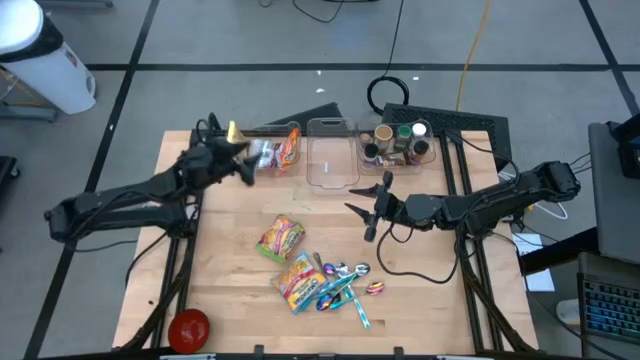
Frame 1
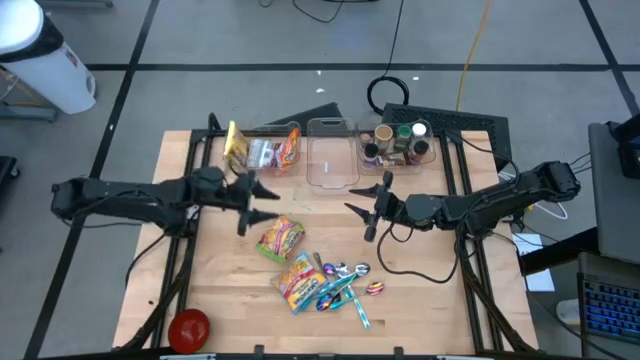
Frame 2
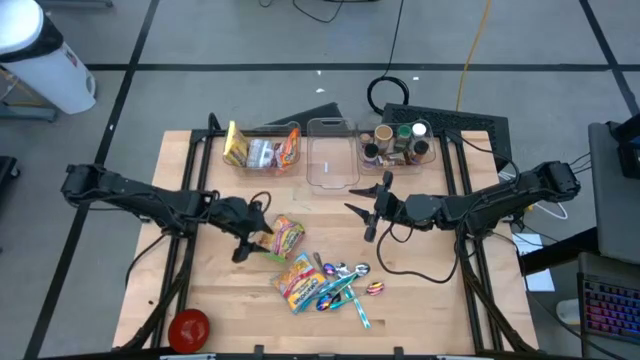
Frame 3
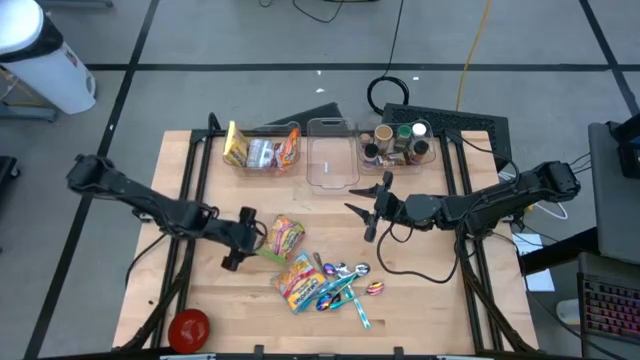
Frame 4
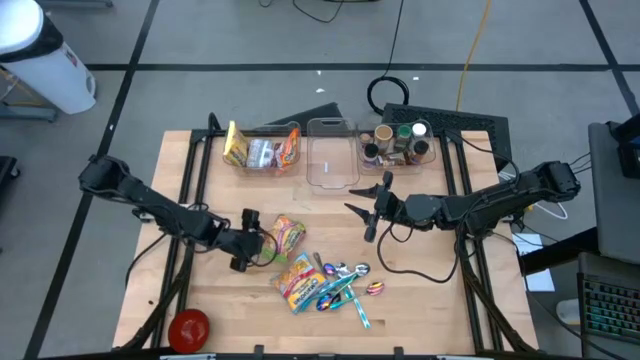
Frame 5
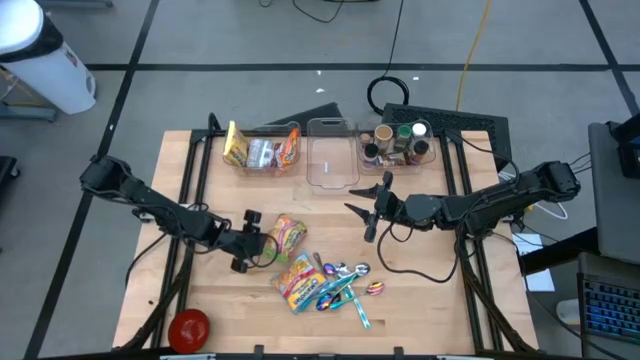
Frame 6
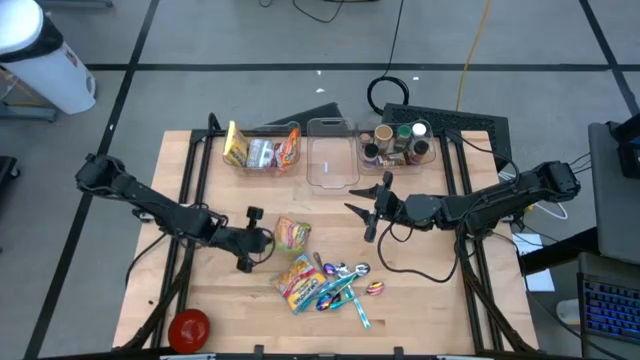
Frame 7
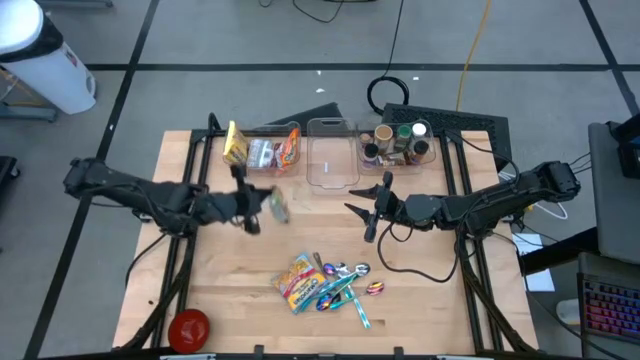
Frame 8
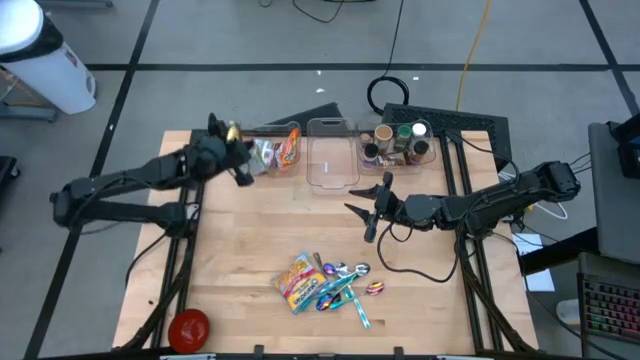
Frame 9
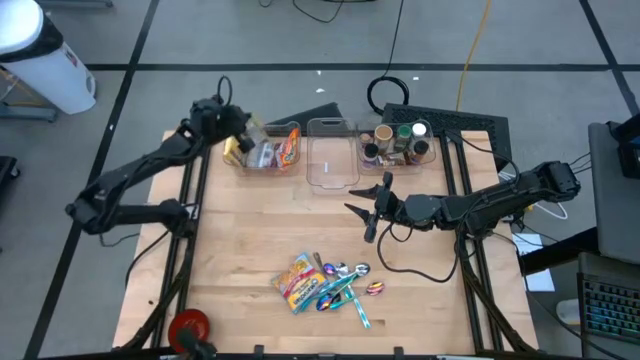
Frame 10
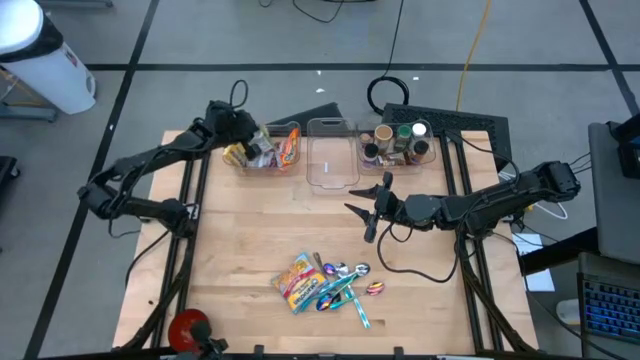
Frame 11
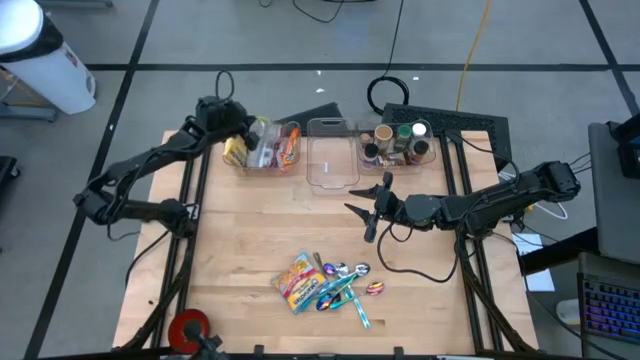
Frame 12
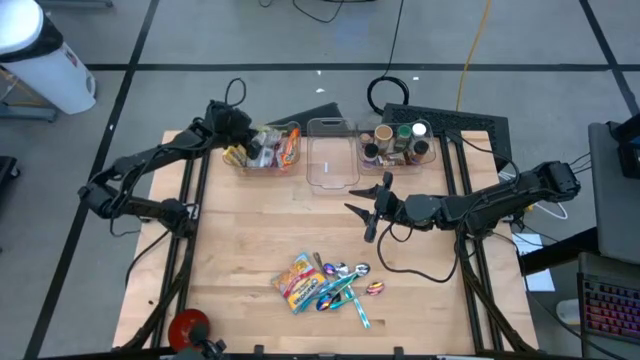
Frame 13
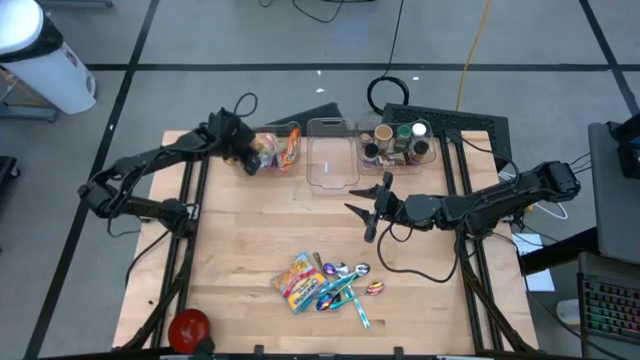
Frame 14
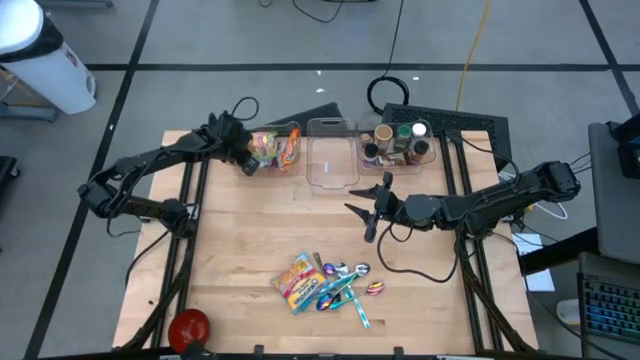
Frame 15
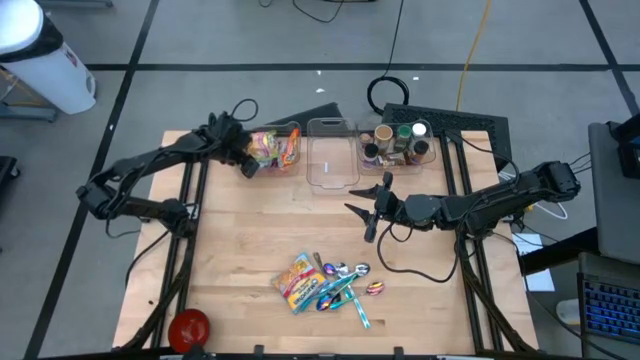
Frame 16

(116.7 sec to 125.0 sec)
Task: Pick & Place Food Item
Put the green noodle pack into the left transparent bin

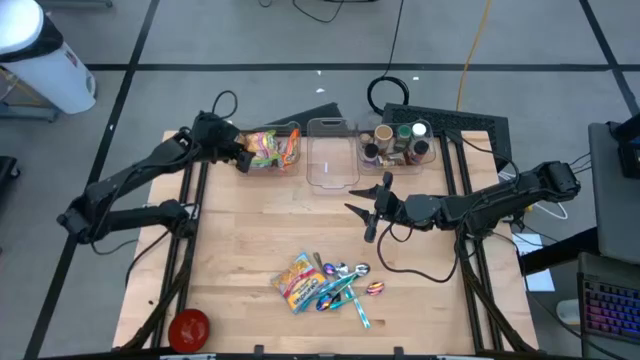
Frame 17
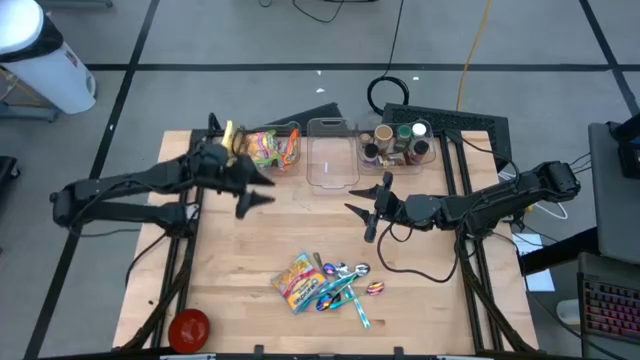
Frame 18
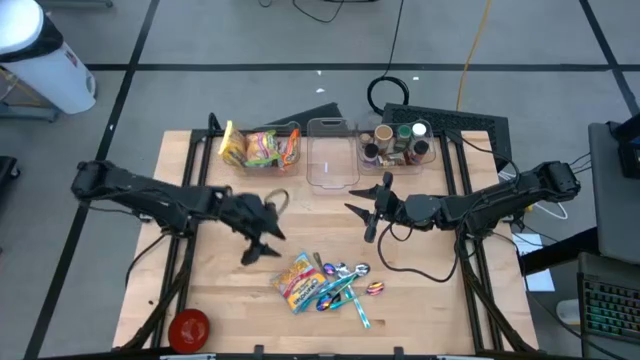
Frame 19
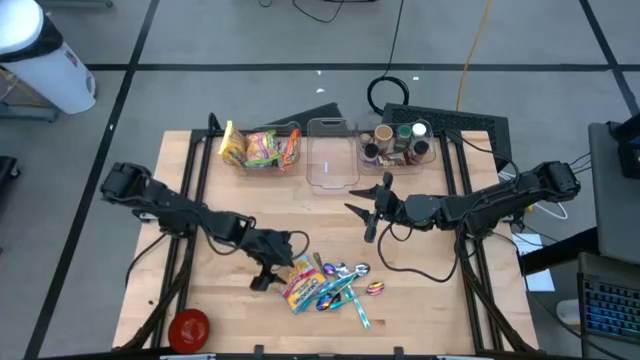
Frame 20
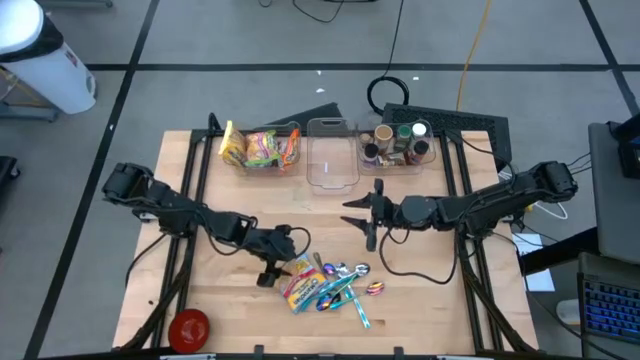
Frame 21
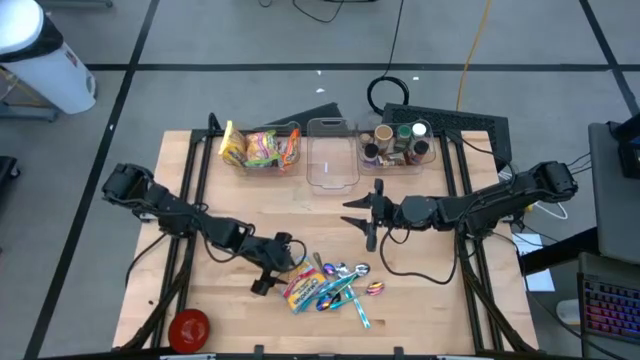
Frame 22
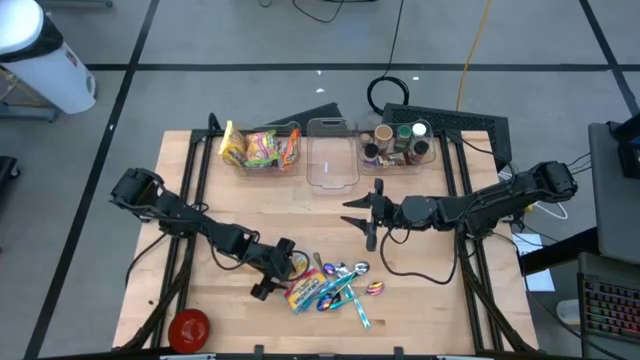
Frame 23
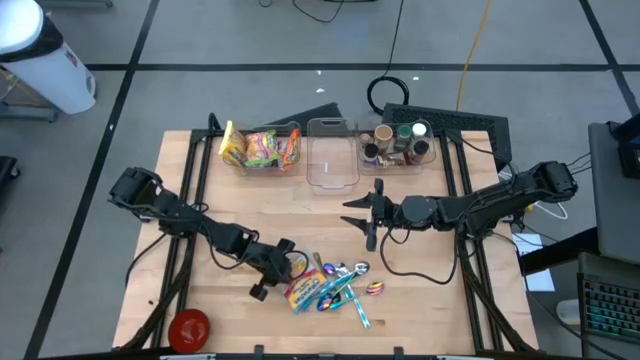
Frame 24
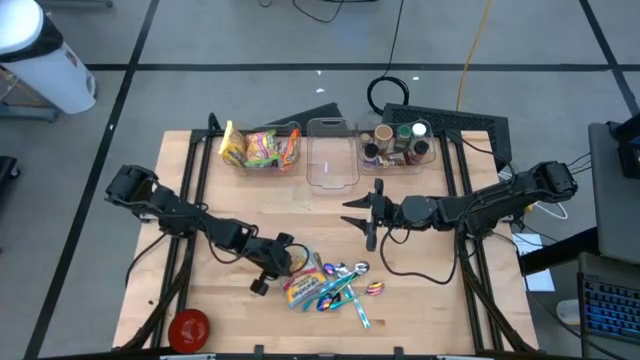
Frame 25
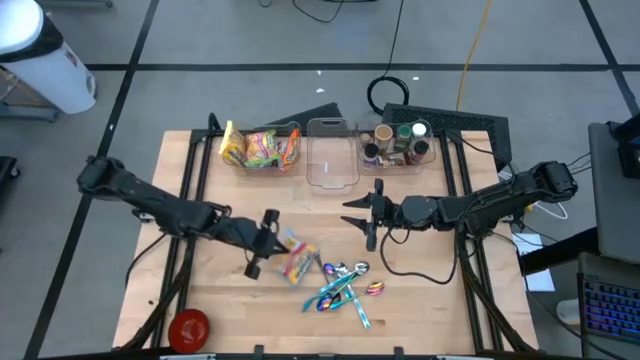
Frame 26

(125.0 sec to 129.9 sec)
Put the blue noodle pack into the left transparent bin

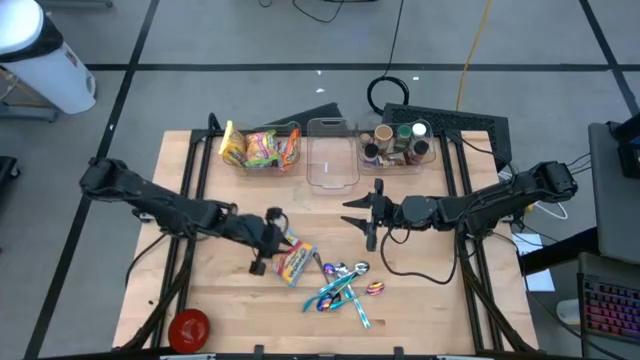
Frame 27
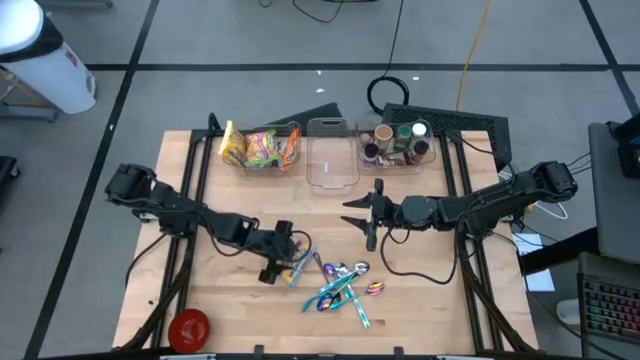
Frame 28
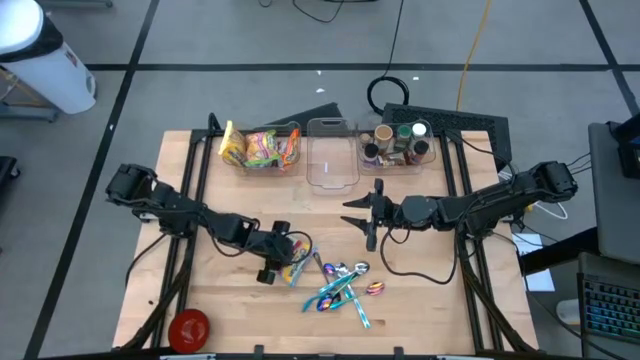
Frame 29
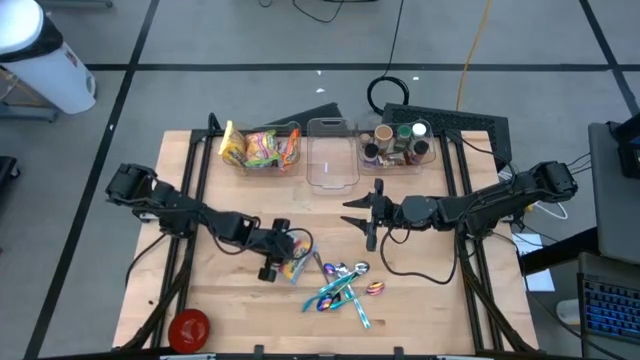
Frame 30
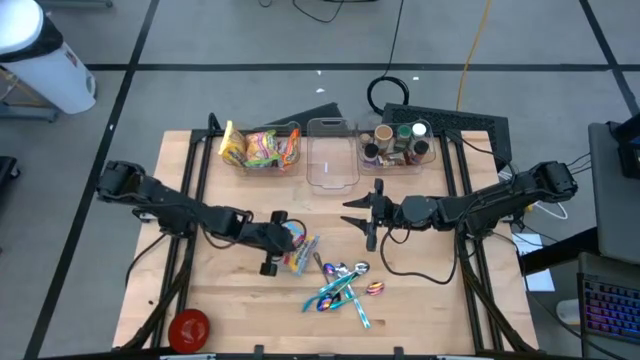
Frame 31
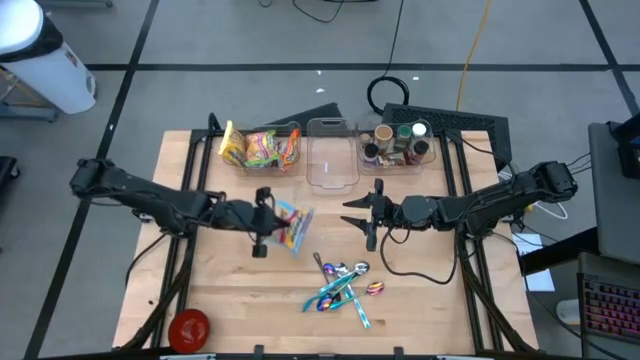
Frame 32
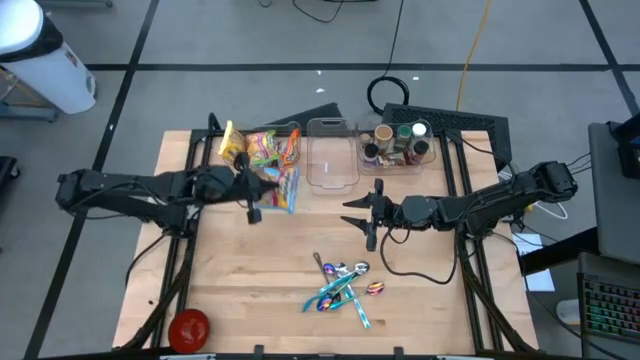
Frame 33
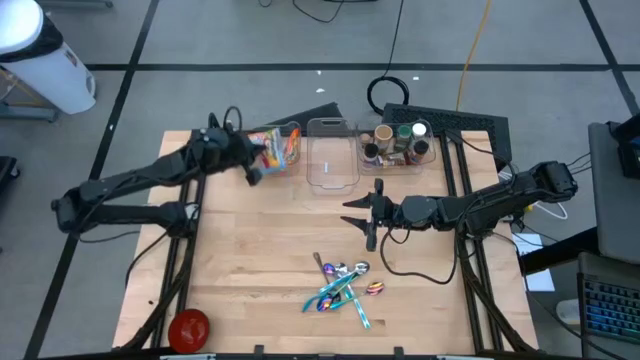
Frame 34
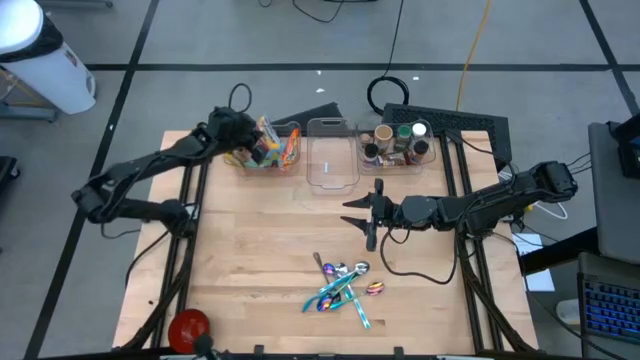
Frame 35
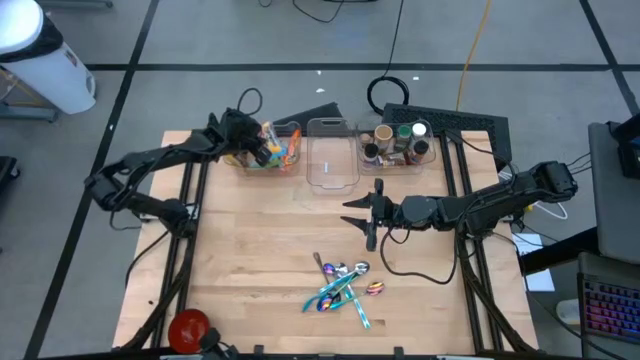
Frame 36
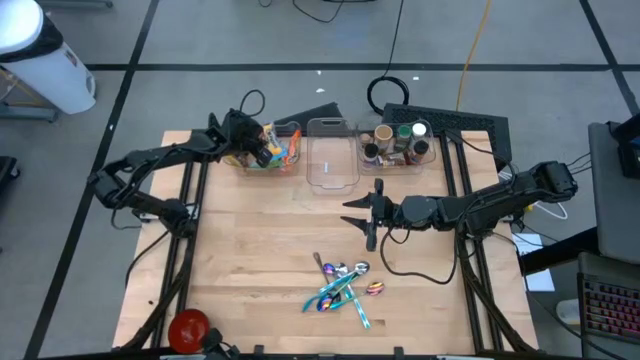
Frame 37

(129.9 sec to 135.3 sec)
Put the blue noodle pack into the left transparent bin

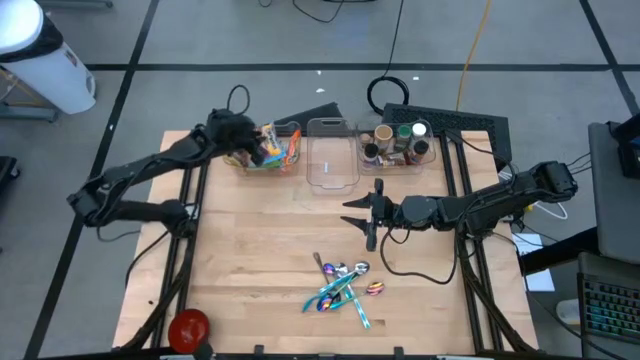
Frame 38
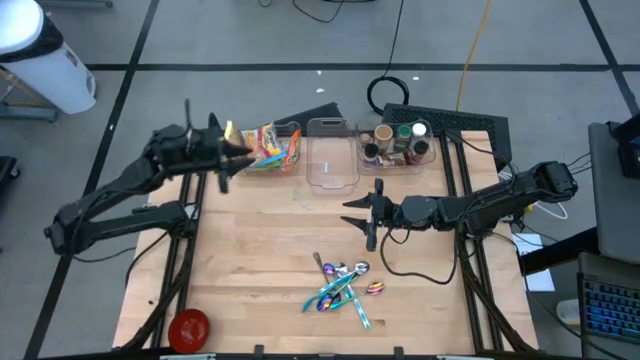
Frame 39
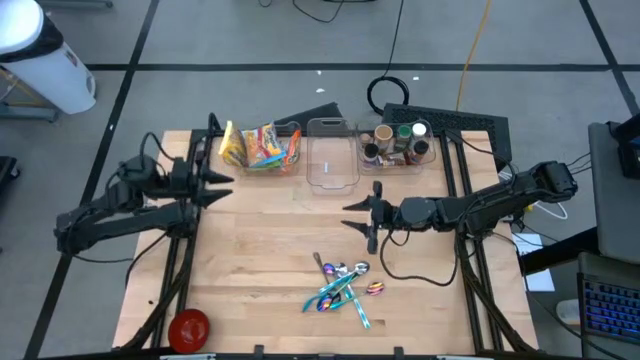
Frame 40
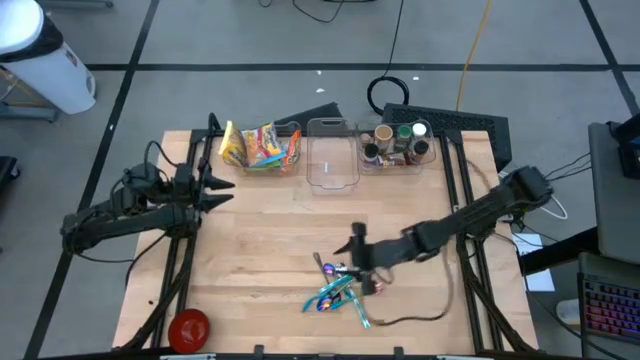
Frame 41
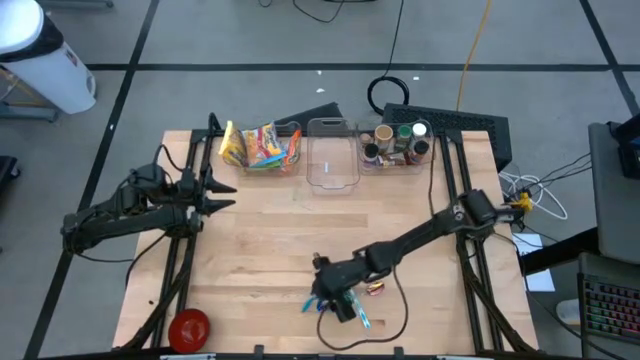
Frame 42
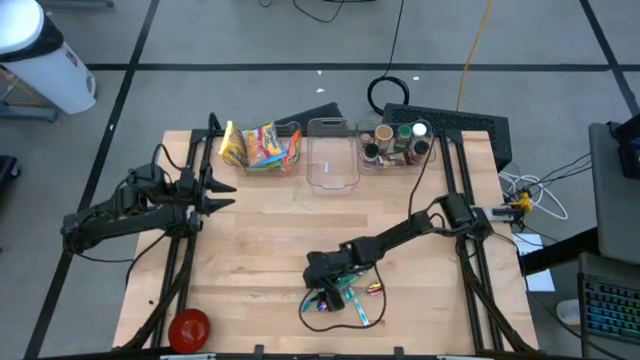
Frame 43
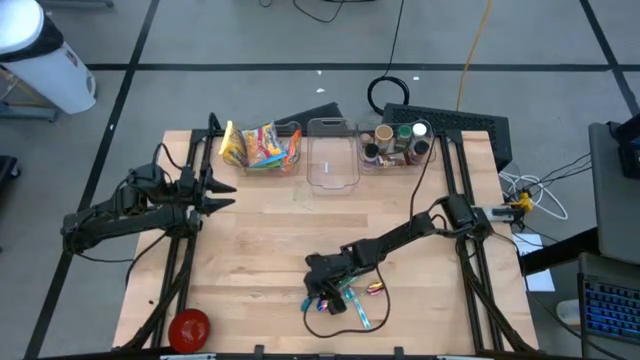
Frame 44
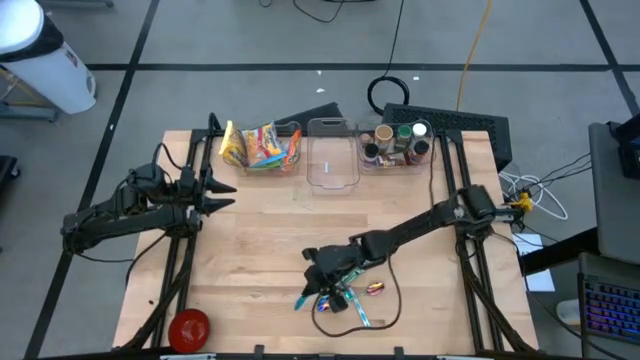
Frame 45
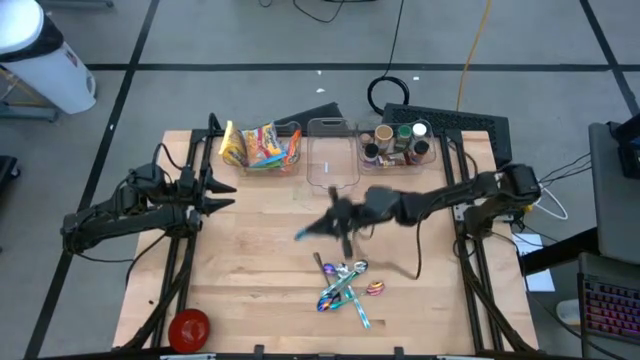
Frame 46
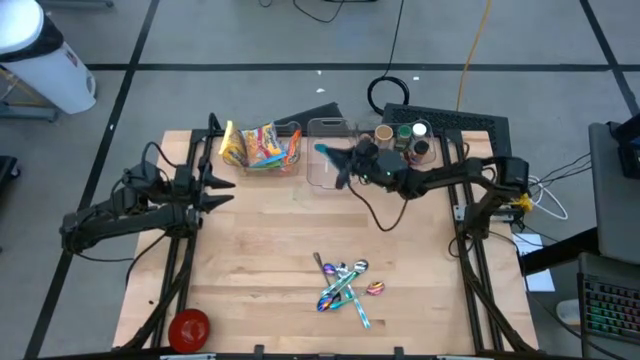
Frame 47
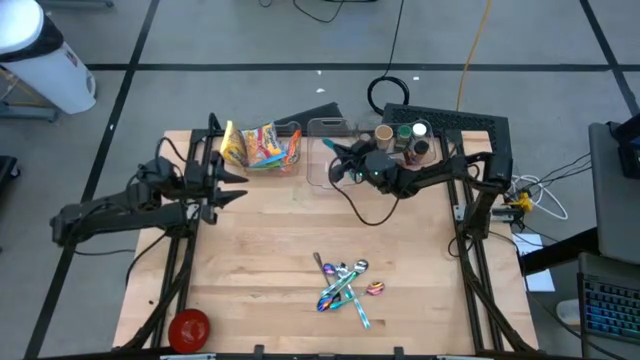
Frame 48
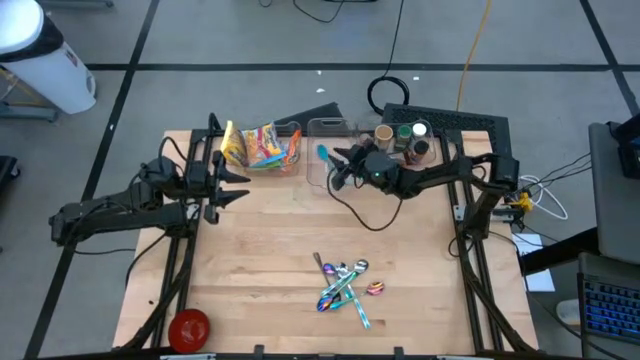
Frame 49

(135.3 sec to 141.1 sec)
Put the blue baby spoon into the middle transparent bin
